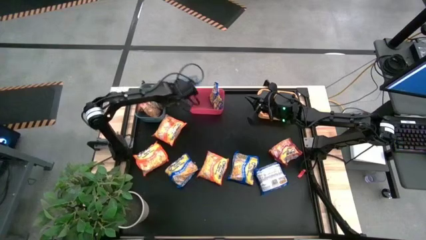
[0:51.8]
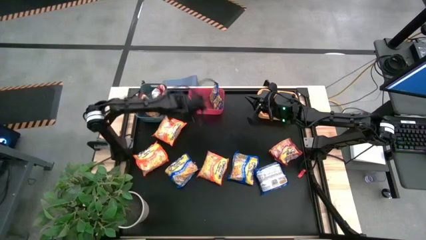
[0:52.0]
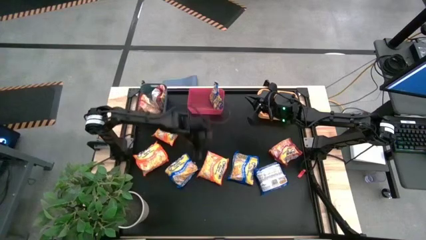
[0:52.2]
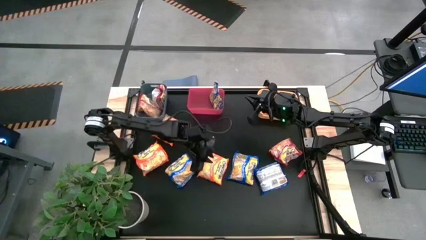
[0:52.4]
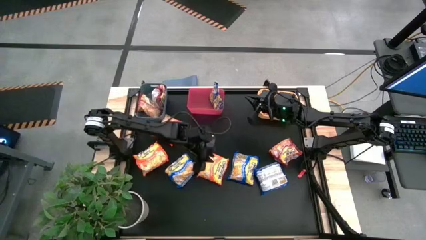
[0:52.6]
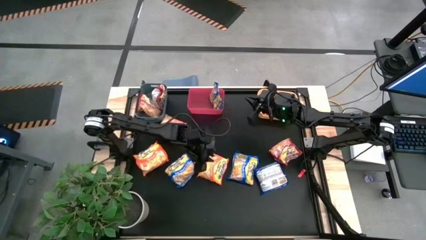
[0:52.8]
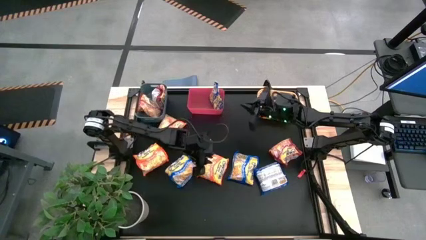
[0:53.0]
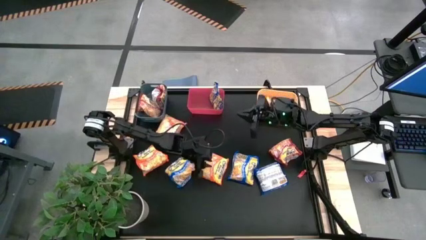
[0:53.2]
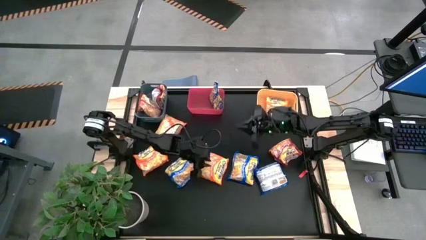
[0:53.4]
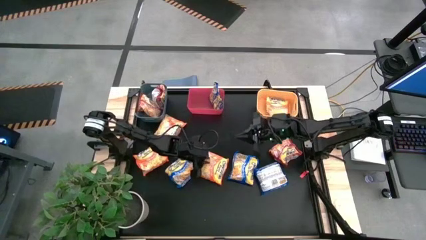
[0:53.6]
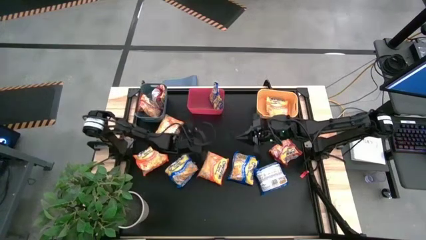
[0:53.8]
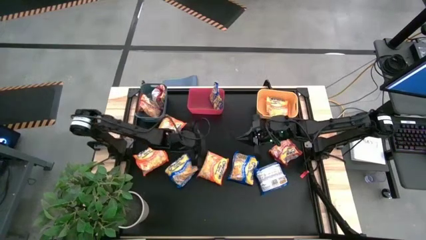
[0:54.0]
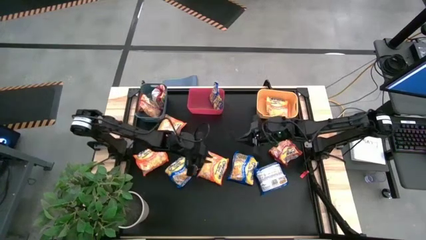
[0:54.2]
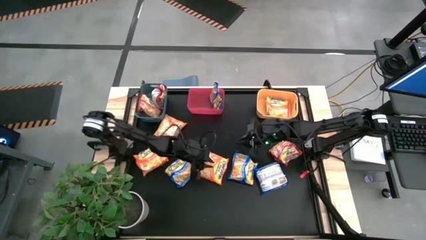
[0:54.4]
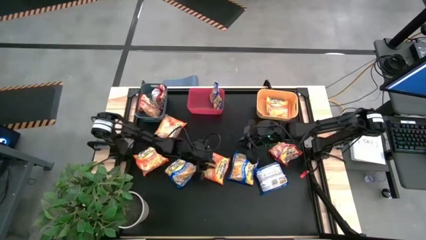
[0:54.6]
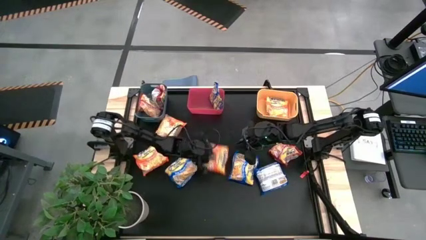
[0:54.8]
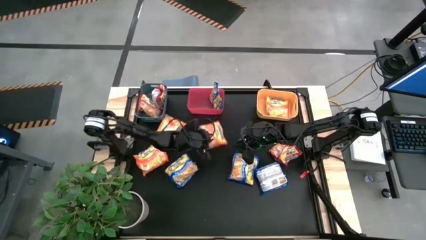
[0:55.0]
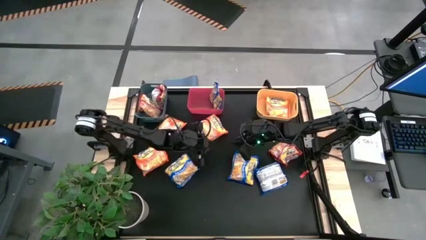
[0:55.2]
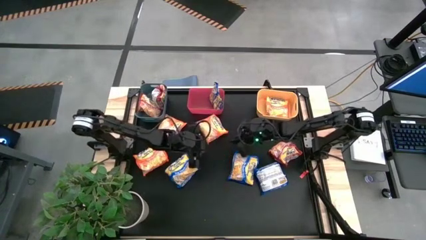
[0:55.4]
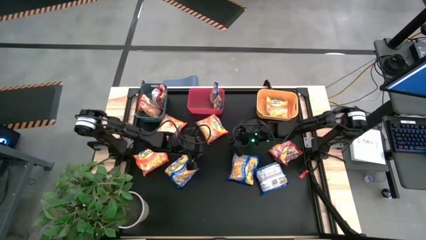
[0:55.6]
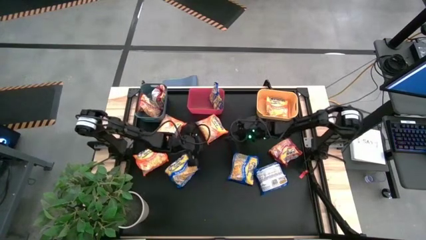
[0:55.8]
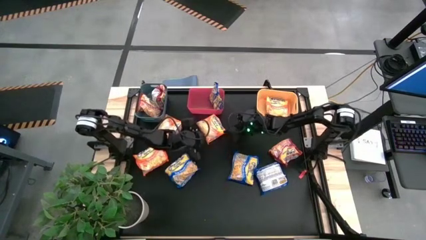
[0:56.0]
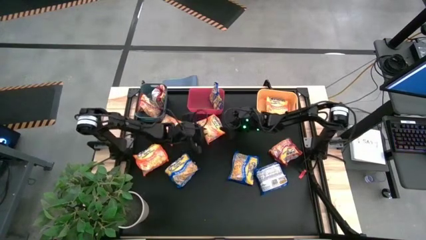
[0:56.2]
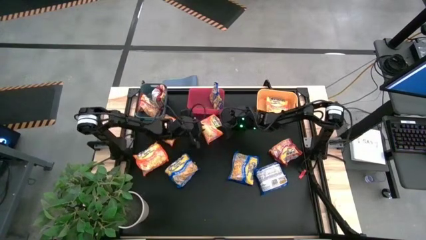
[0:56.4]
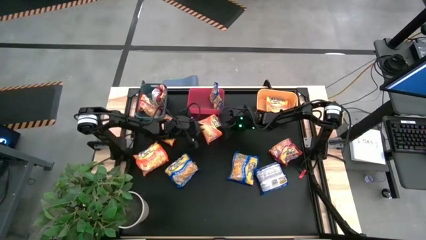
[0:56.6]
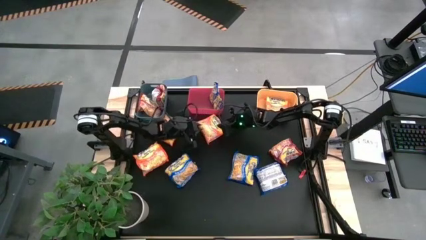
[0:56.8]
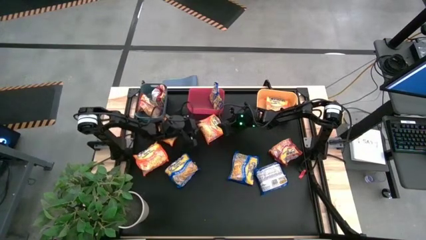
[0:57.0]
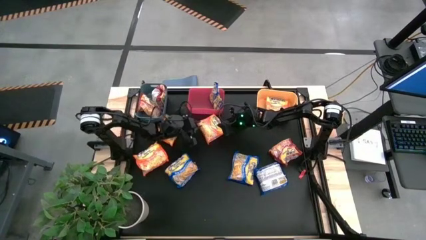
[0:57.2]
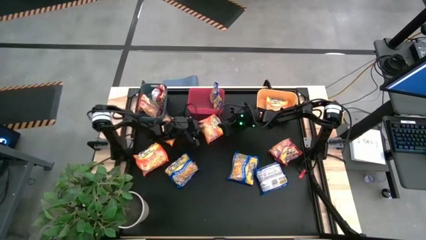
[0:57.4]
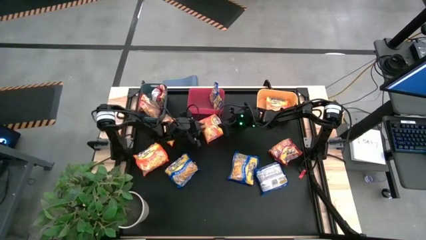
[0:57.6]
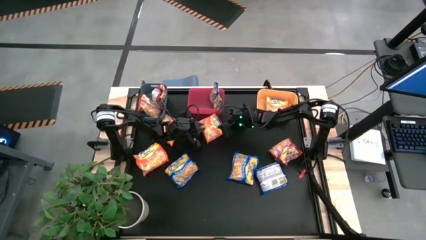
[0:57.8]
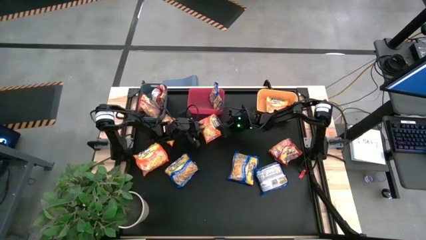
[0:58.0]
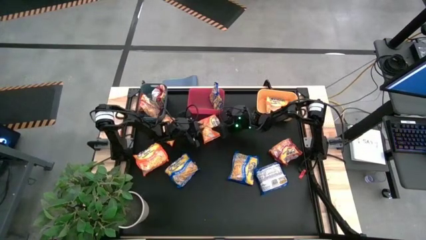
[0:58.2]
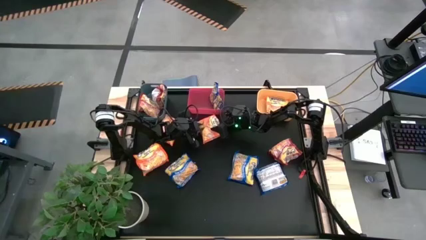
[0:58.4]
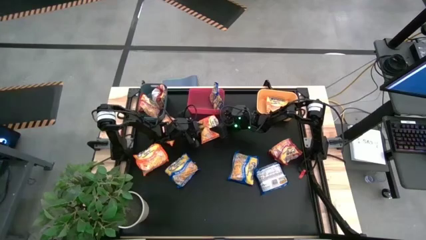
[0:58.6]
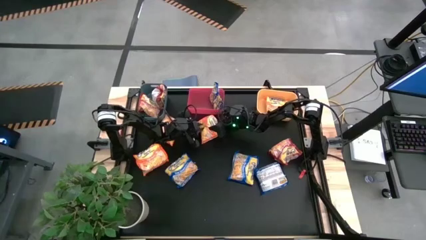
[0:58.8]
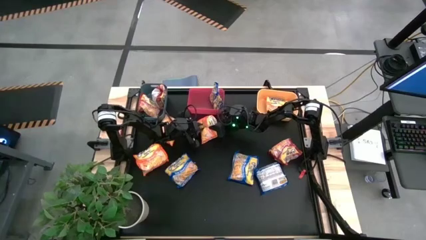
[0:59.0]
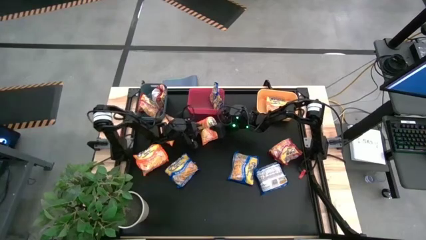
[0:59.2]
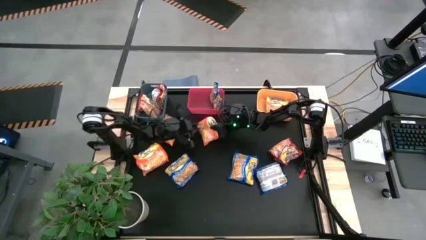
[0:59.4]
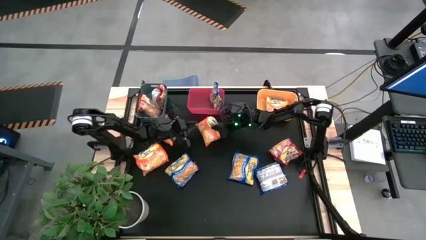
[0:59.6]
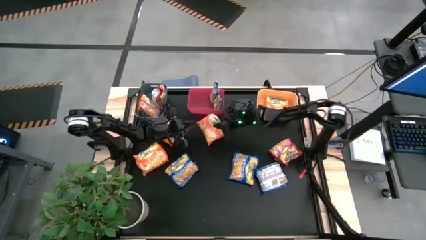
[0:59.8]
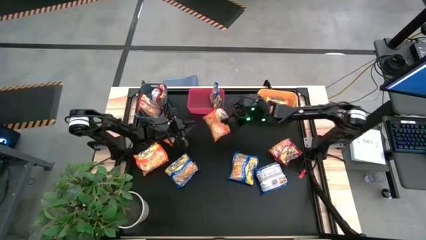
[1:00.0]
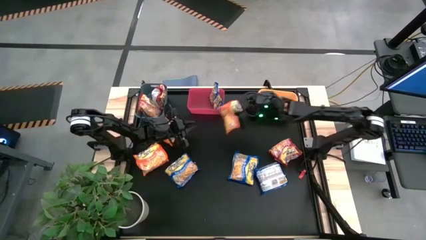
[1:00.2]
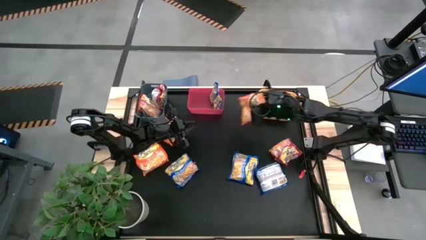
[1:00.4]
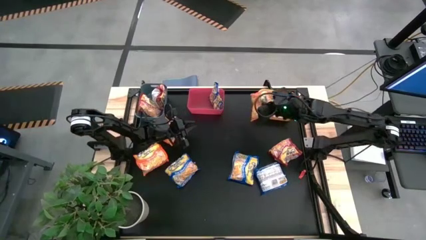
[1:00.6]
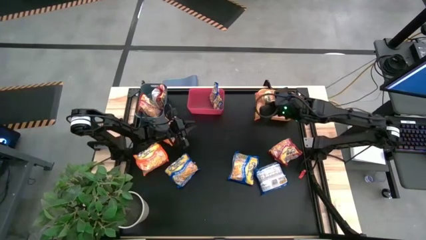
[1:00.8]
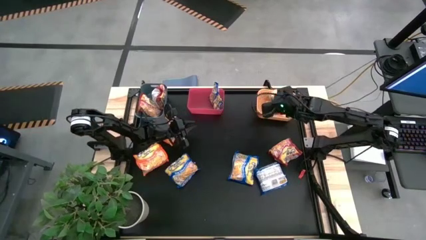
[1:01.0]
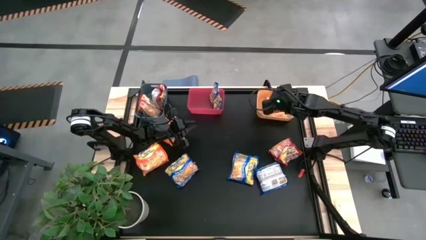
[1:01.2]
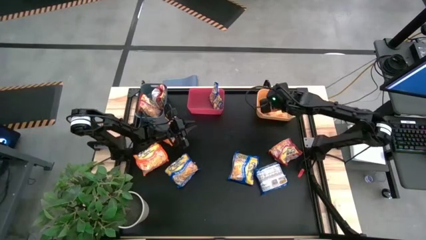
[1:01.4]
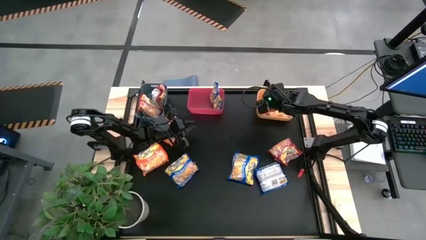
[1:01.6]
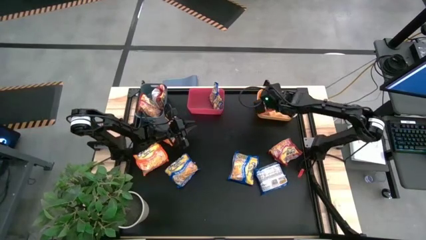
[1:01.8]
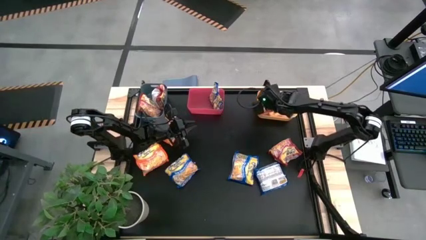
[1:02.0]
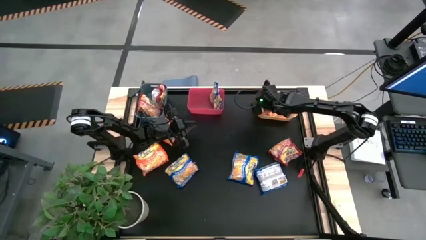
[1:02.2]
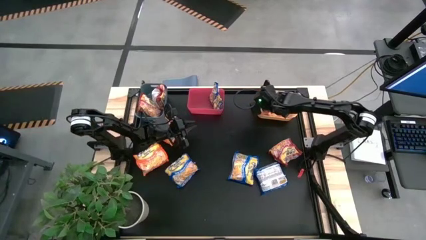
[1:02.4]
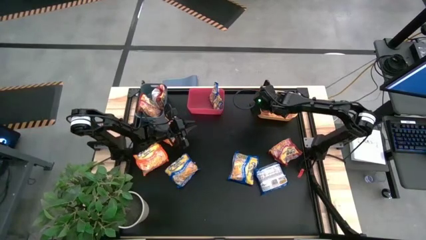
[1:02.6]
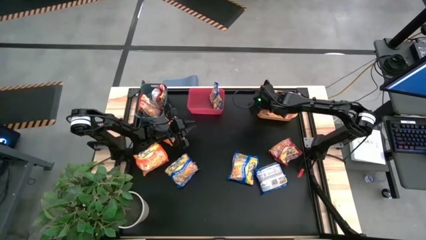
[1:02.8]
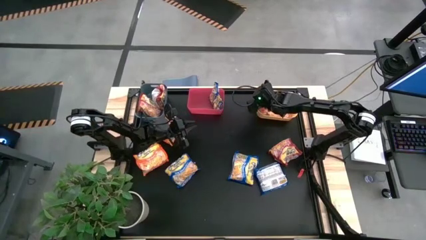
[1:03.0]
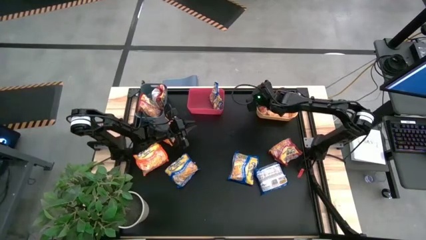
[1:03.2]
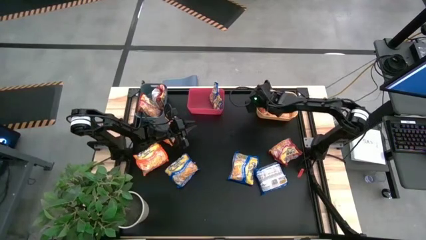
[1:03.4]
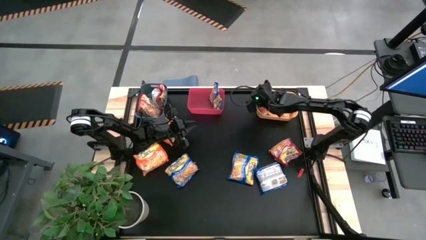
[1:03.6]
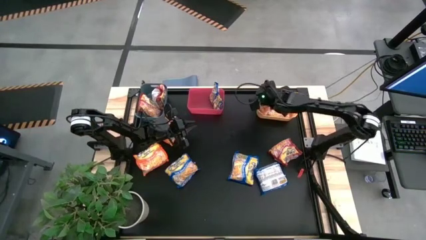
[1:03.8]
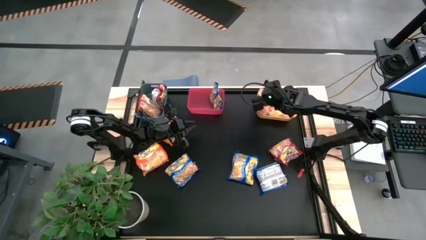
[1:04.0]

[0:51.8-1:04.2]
Task: Sort Maruchan noodles
Put the orange noodle pack into the yellow bin
